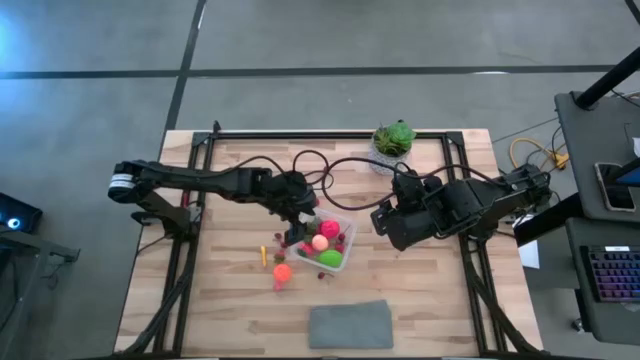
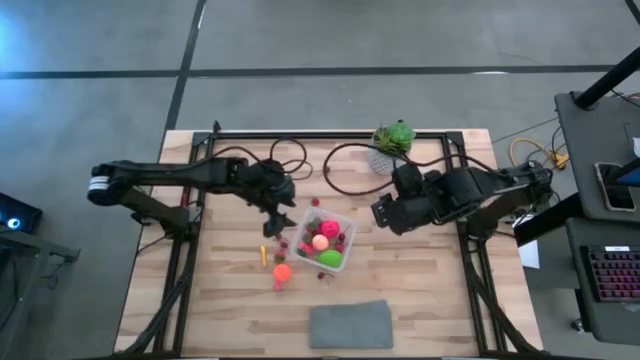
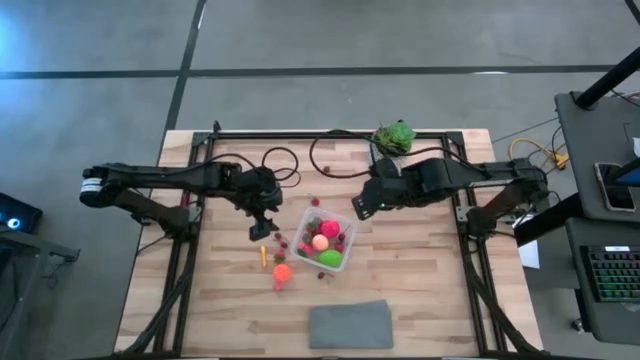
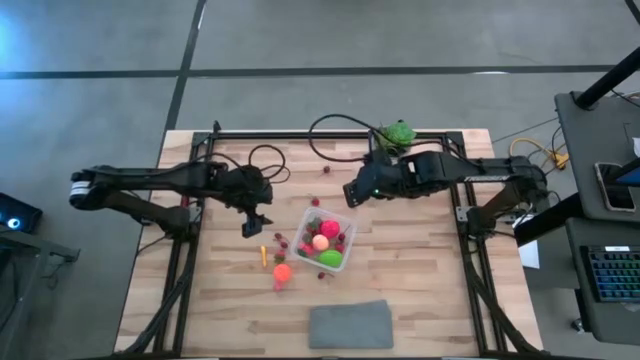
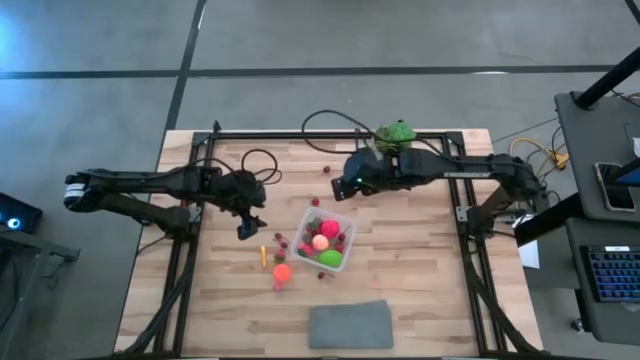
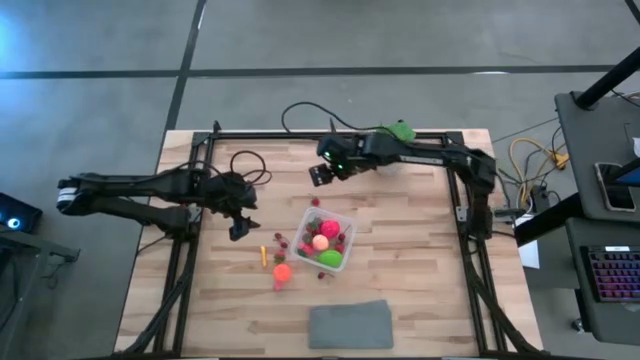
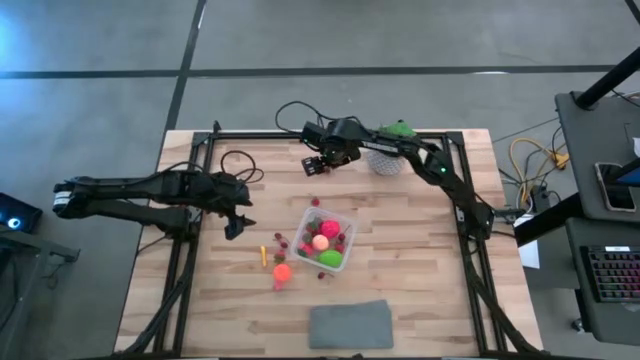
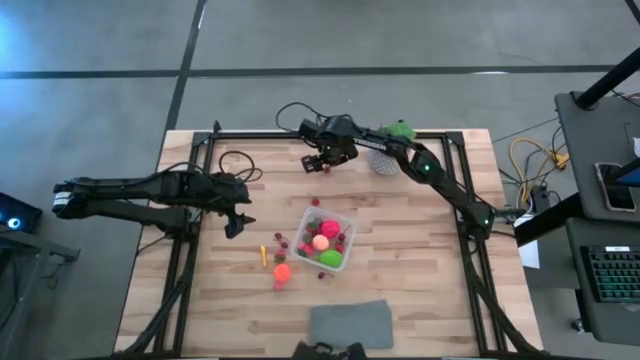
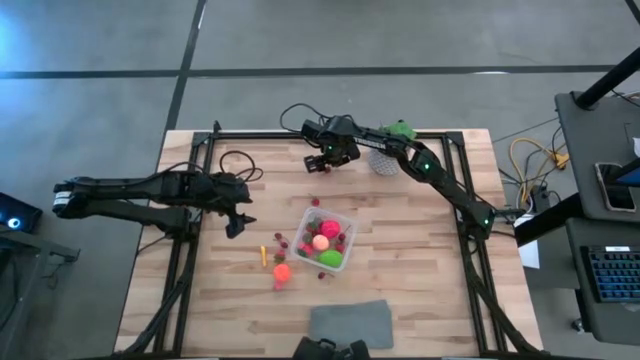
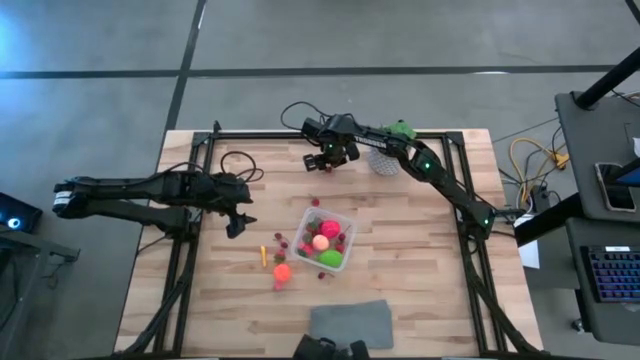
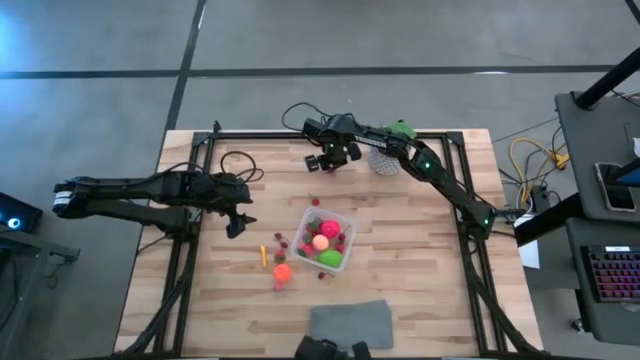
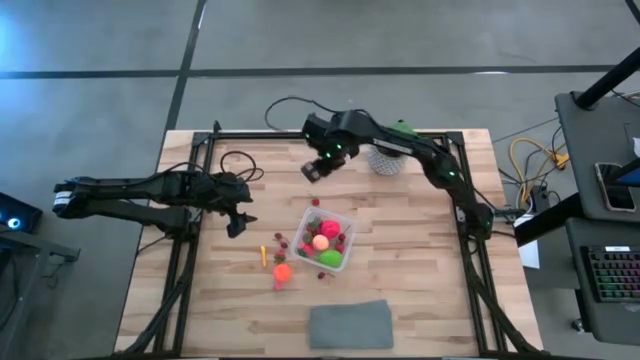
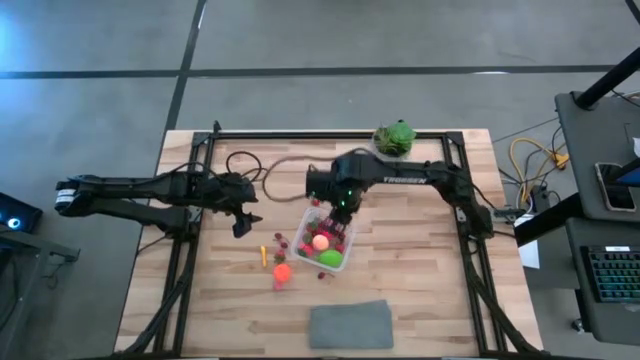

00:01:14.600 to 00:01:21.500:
Task: Pick and placing Produce into tupperware
Put the red cherry into the transparent container

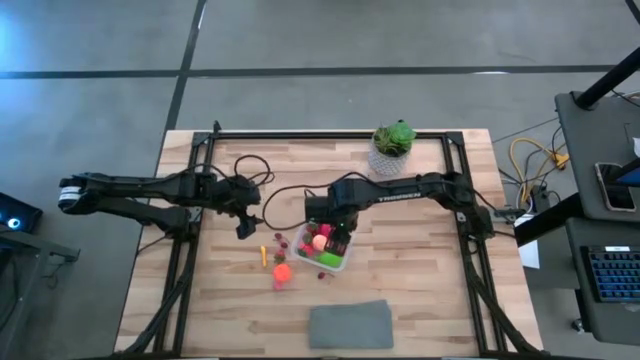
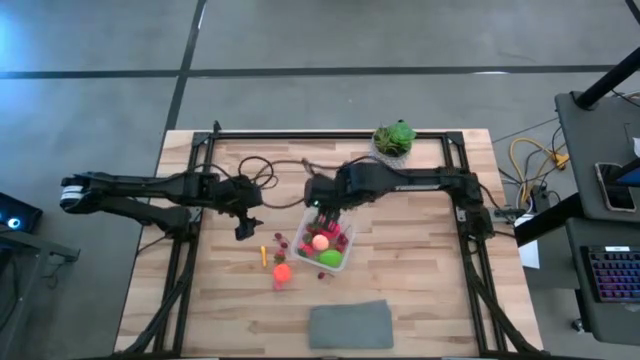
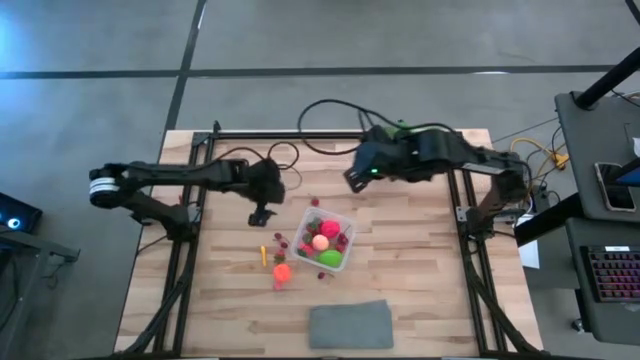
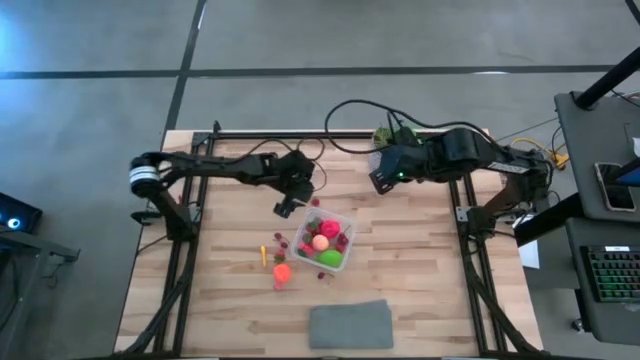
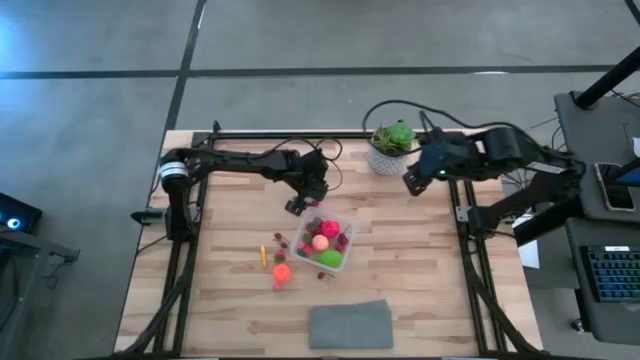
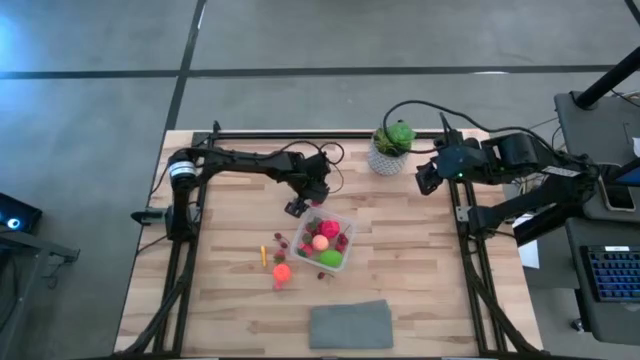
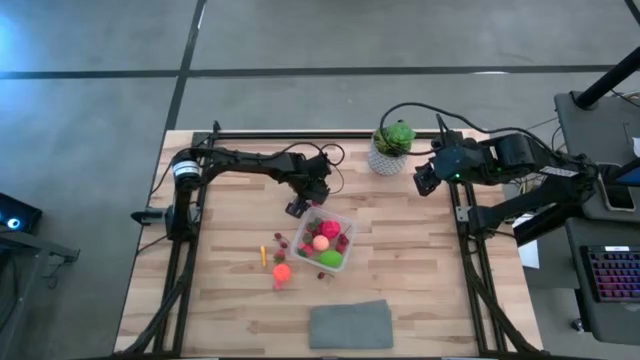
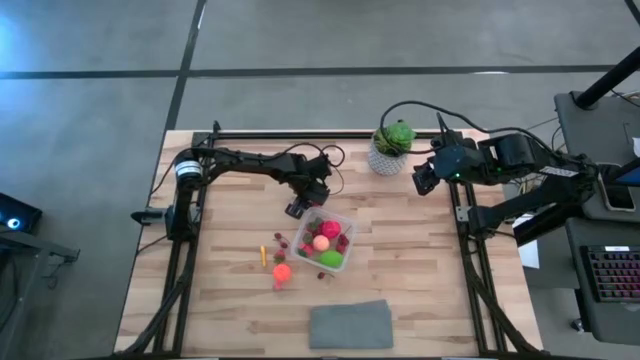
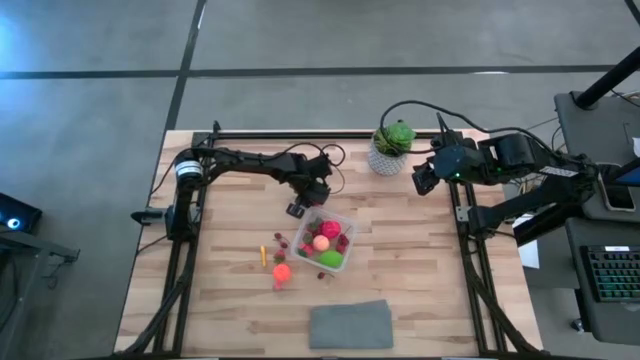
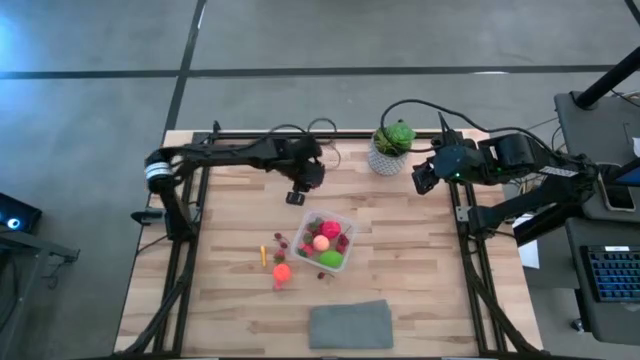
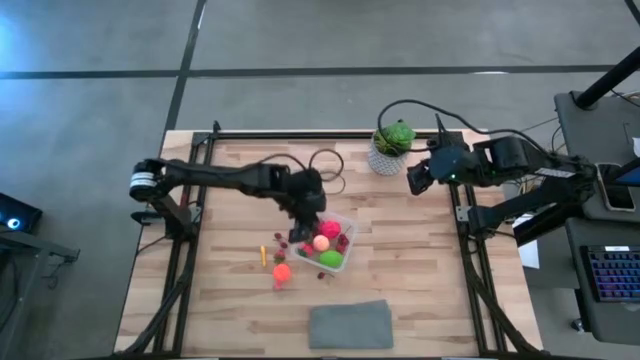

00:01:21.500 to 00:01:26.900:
Put the red strawberry into the transparent container

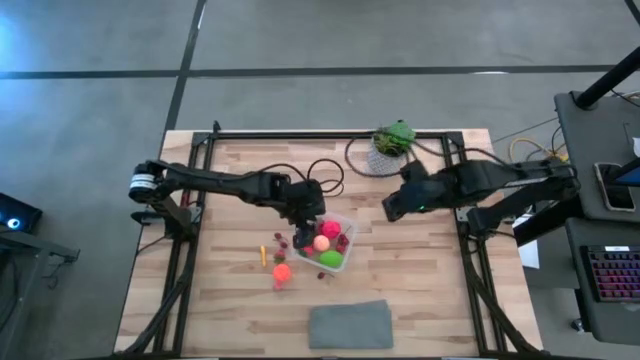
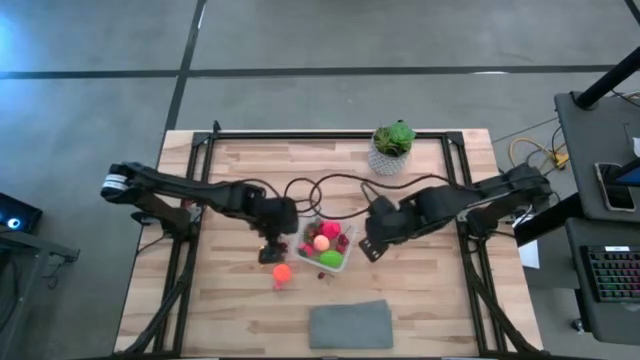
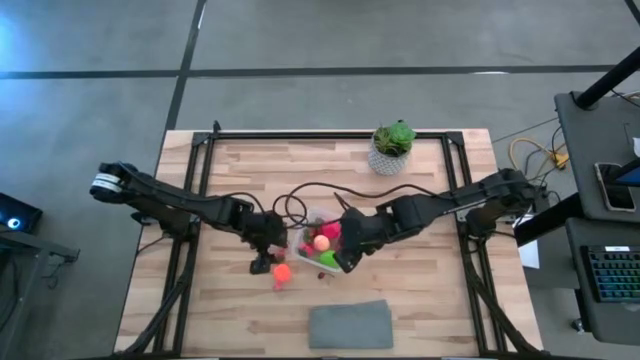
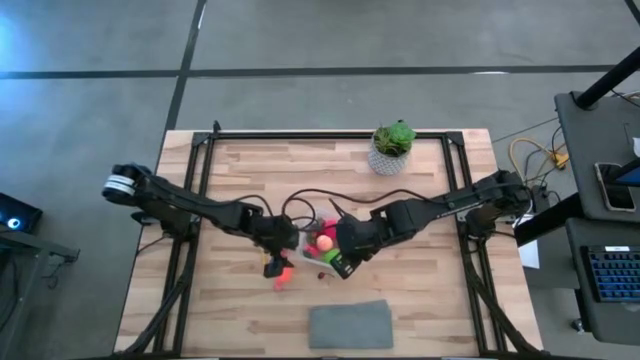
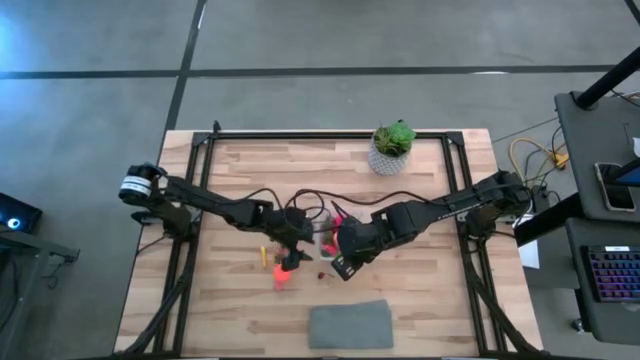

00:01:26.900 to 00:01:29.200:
Adjust the transparent container on the table

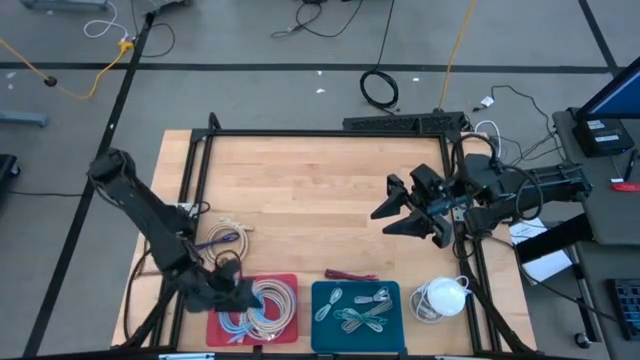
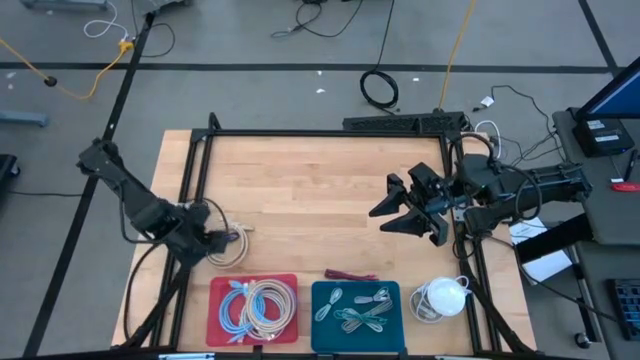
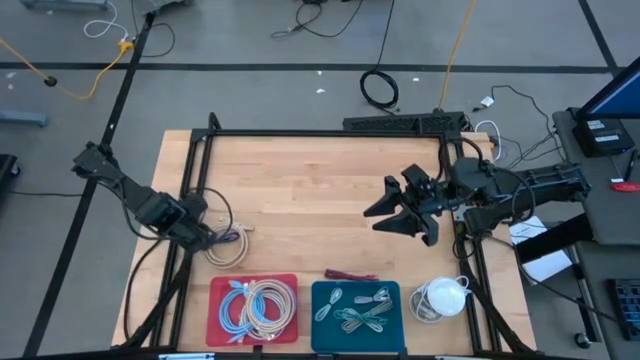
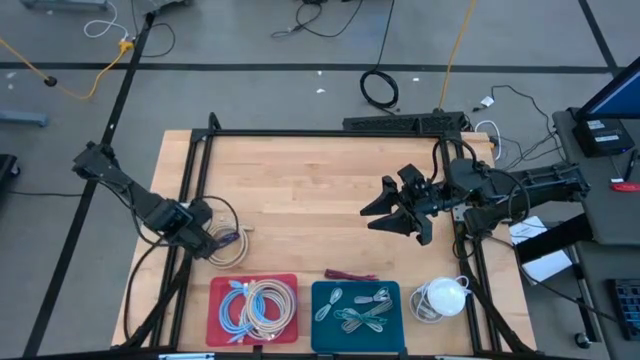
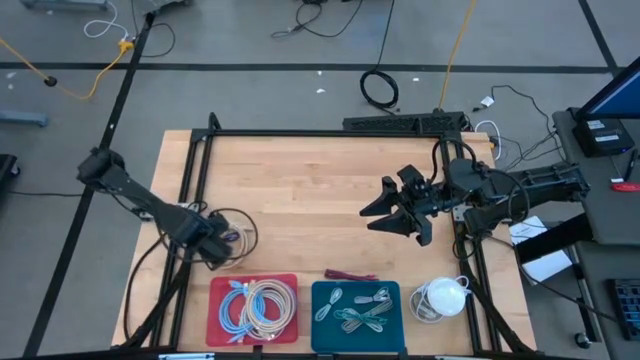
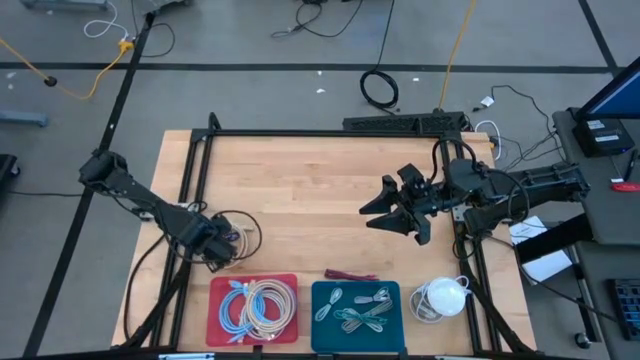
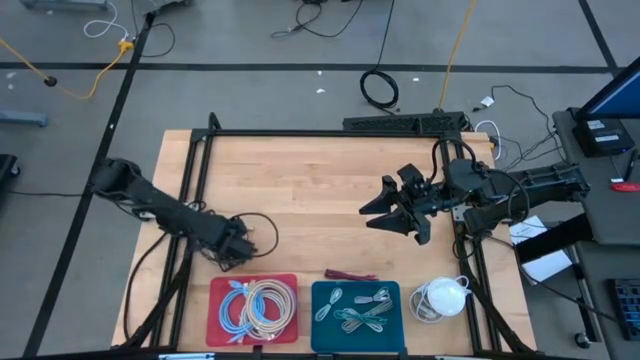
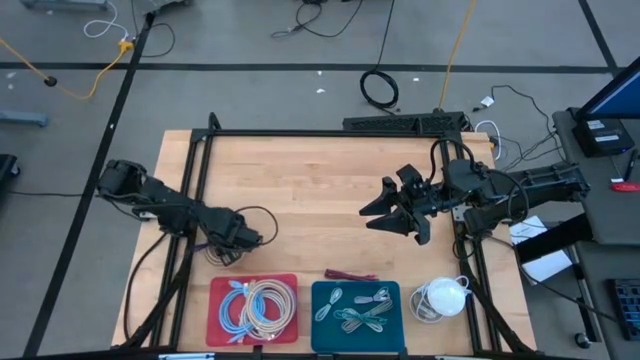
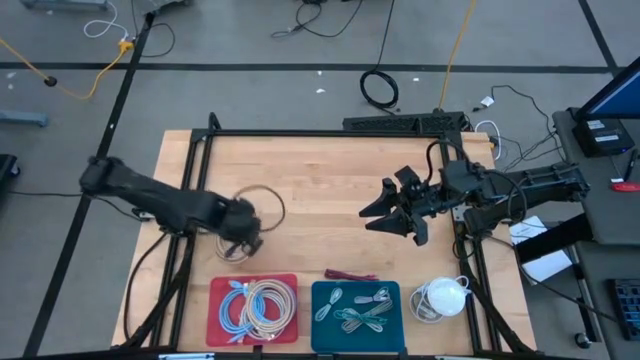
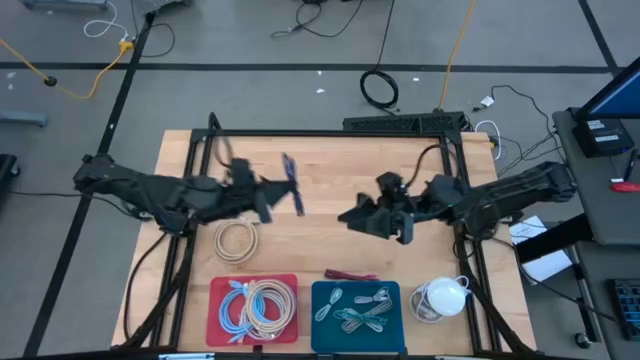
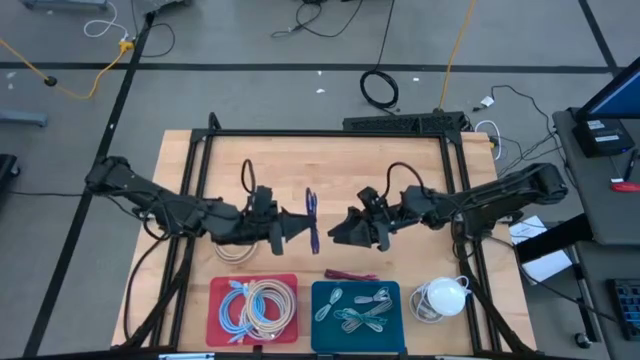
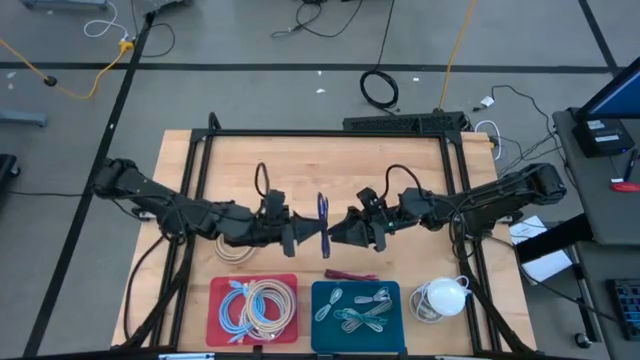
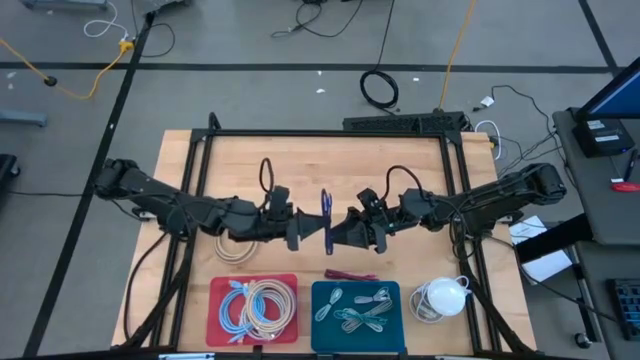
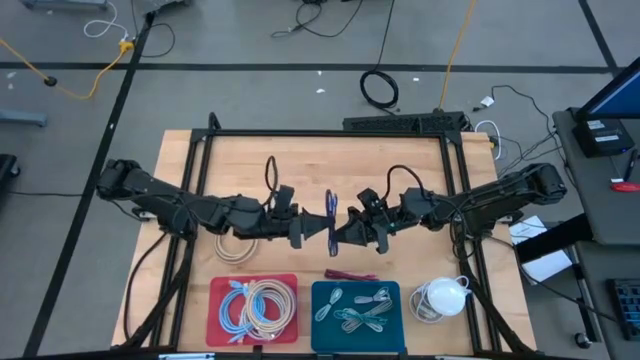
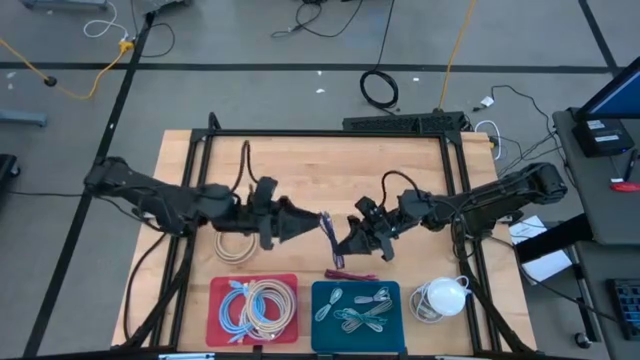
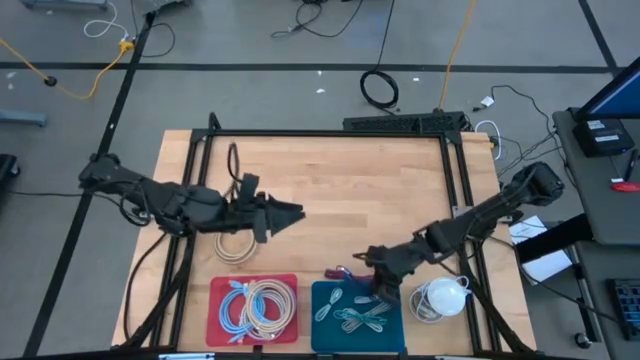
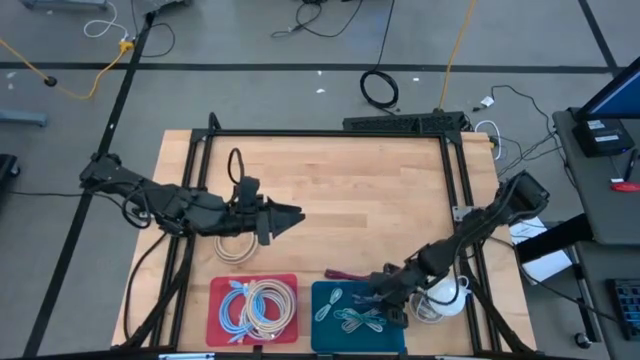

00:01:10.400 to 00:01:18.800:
Task: Pick & Place USB Port
Put the blue USB cable into the blue bin
